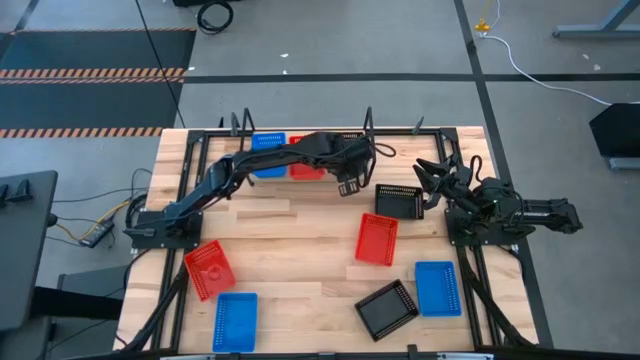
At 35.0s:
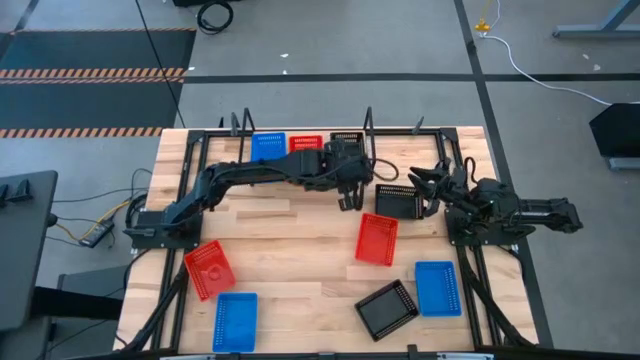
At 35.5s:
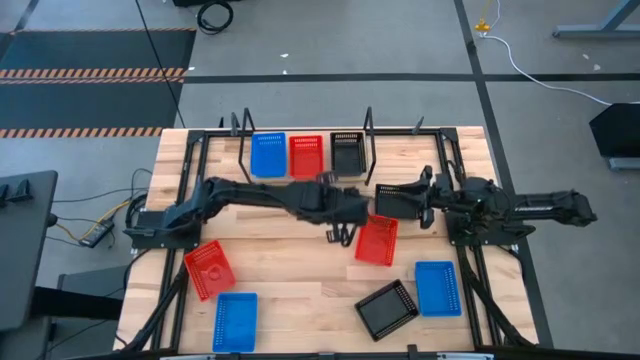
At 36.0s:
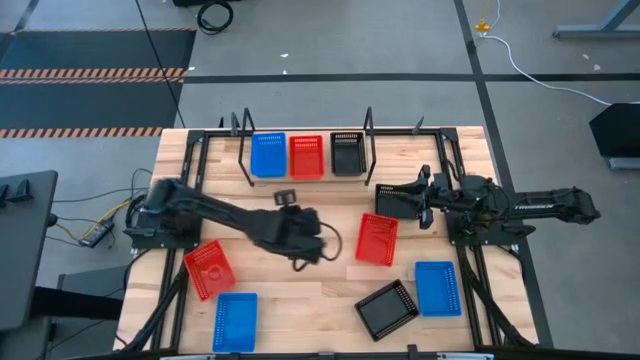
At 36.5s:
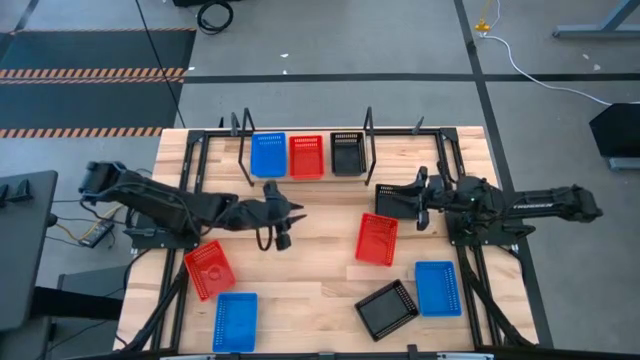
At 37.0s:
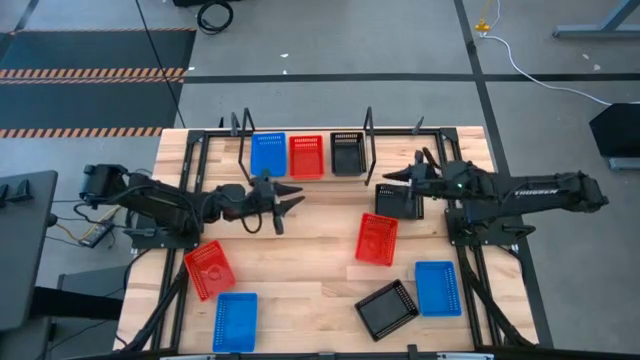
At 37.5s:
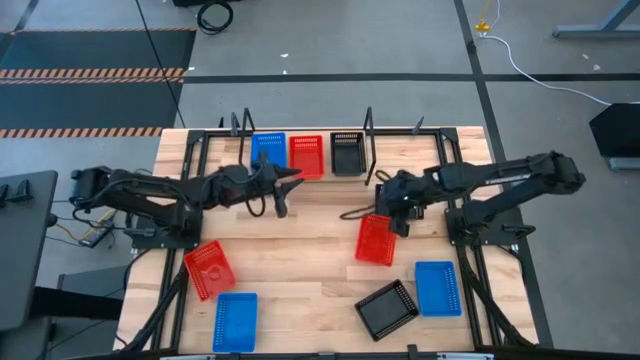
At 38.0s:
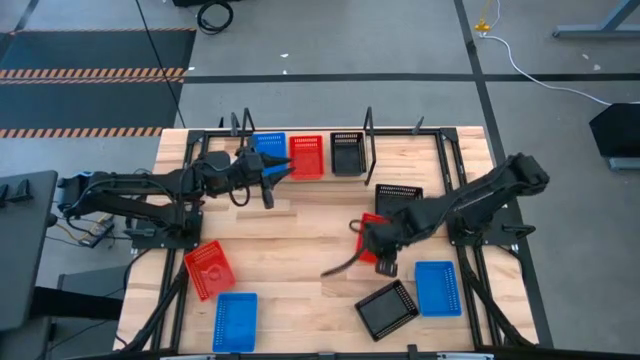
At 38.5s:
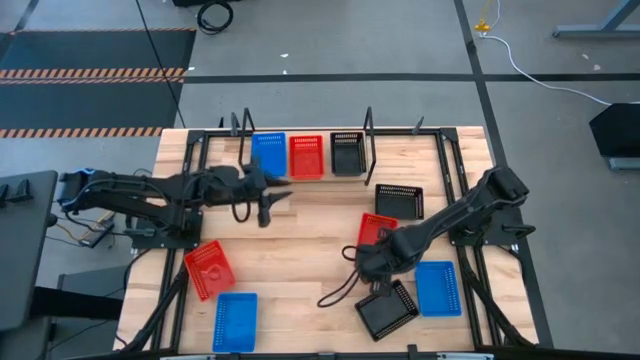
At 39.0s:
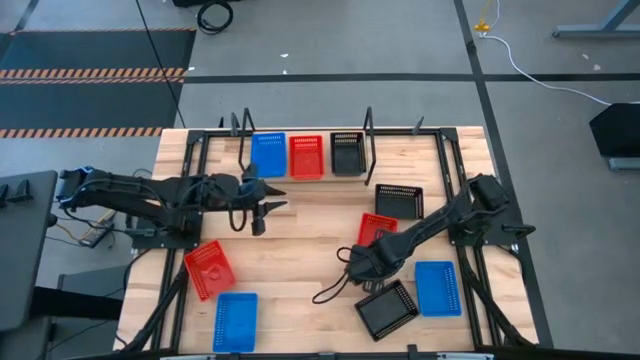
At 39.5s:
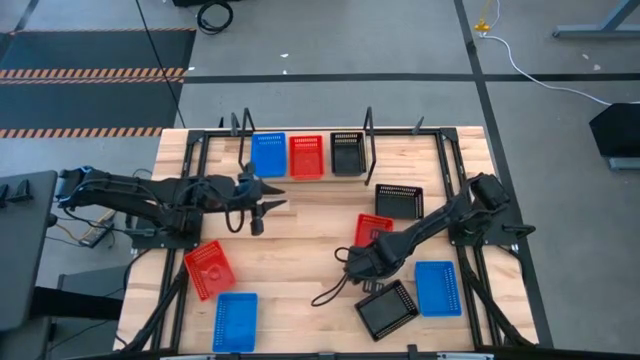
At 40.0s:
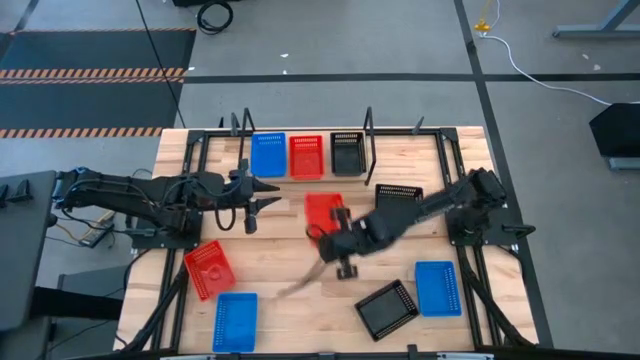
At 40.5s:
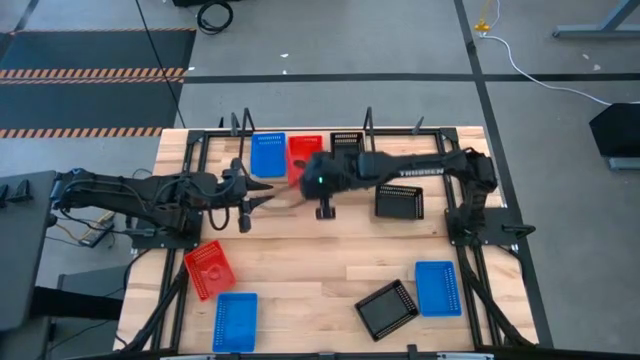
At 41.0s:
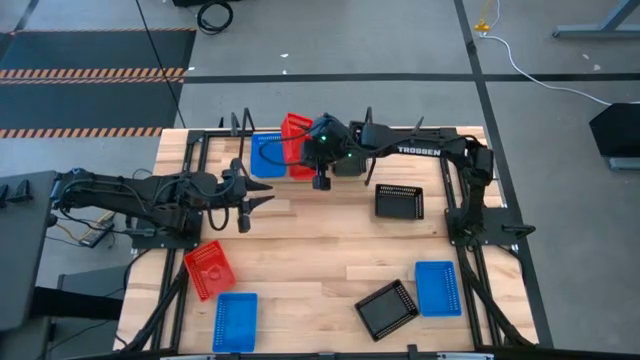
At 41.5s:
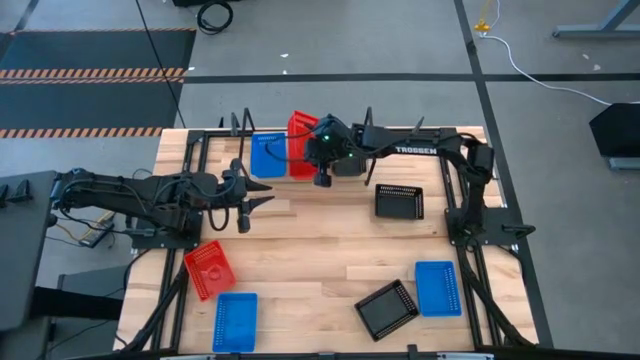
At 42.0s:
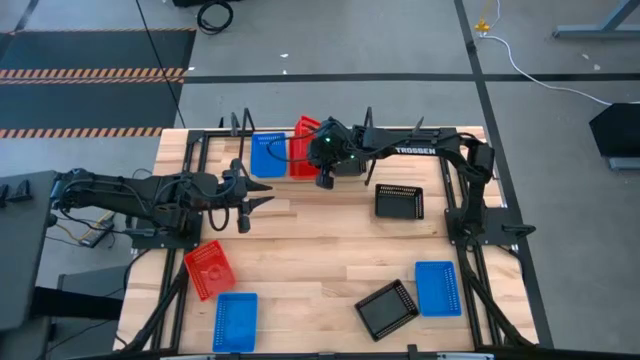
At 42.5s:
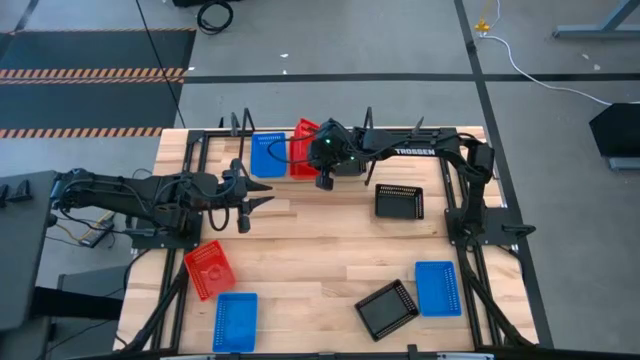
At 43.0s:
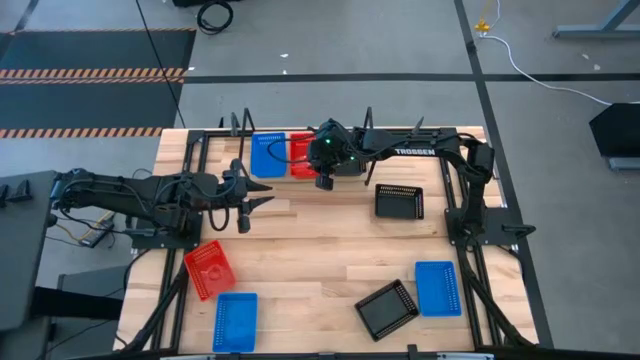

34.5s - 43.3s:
Task: Stack baskets on shelf by color
Stack the right red basket on top of the red basket on the shelf

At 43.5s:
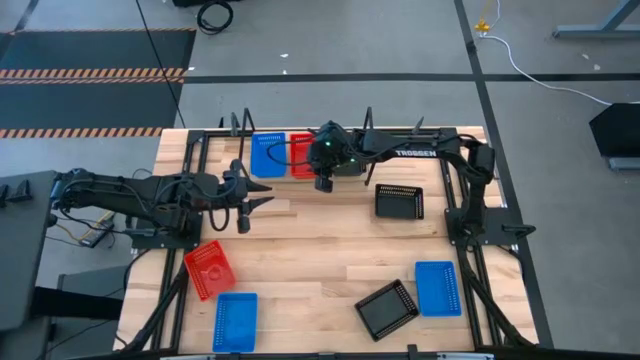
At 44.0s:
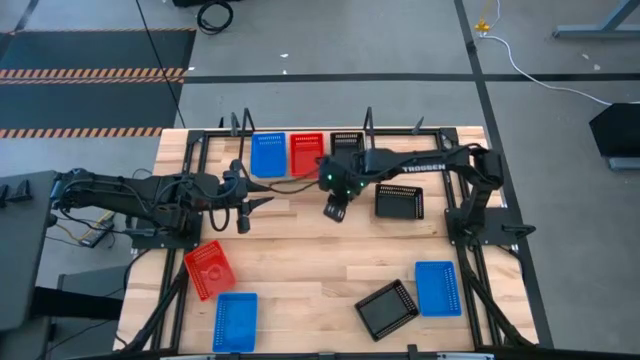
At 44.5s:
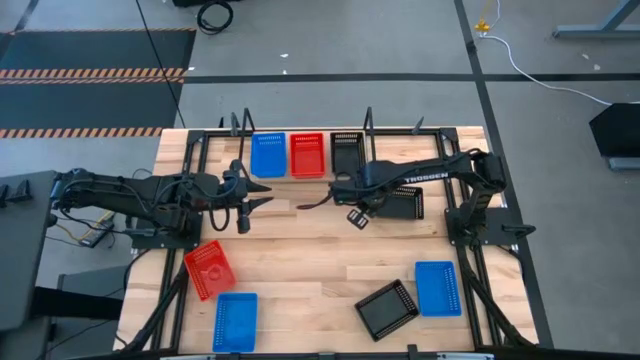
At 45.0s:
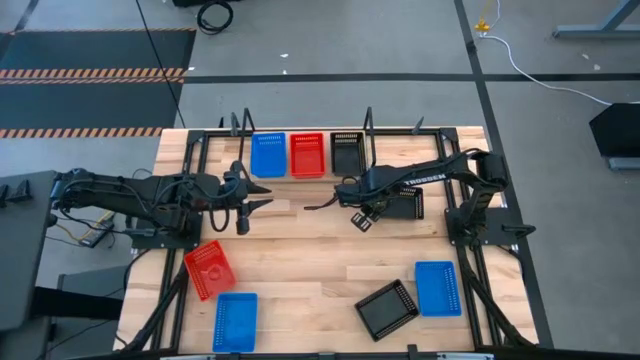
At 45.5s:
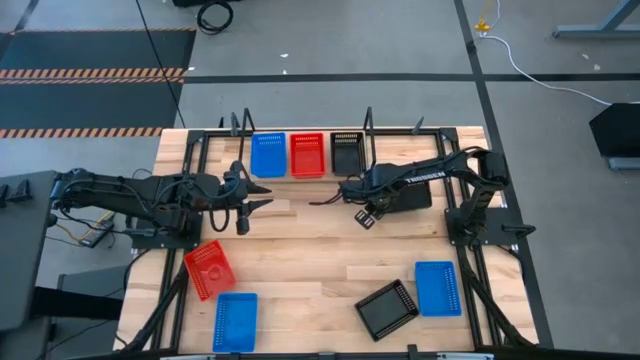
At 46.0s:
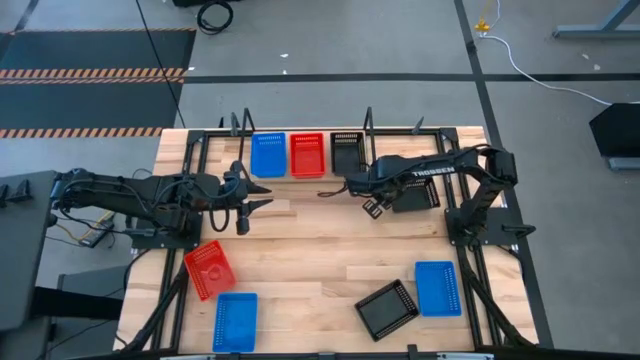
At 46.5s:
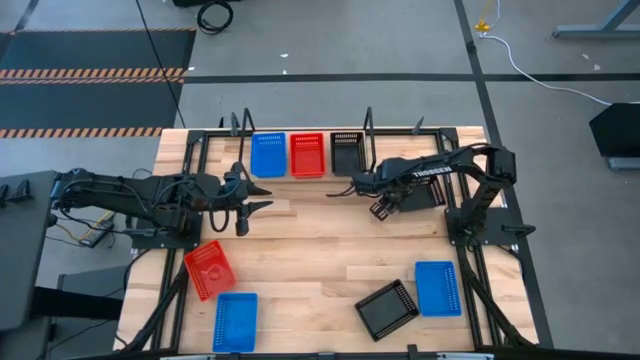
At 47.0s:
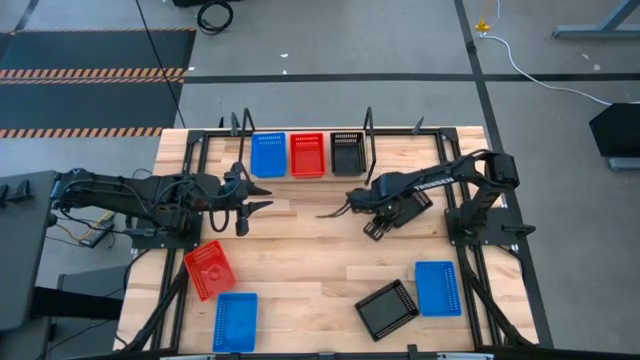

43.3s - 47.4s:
Stack the top black bin on top of the black bin on the shelf

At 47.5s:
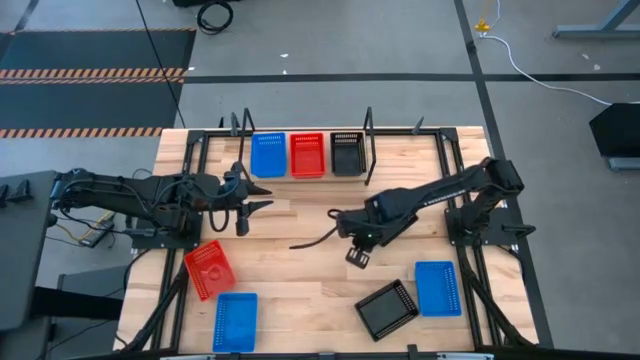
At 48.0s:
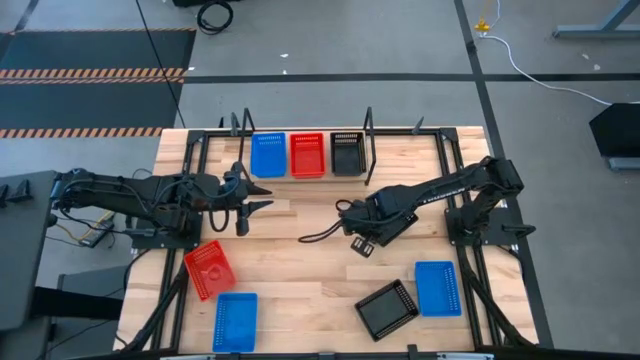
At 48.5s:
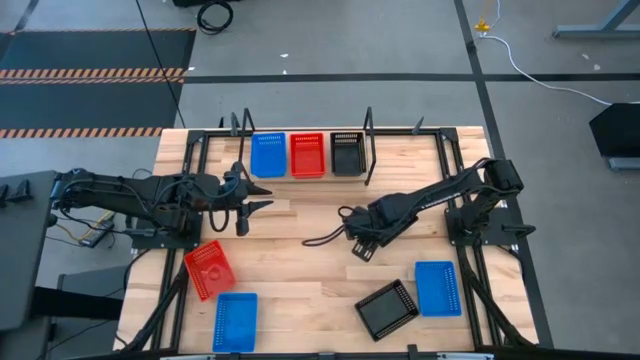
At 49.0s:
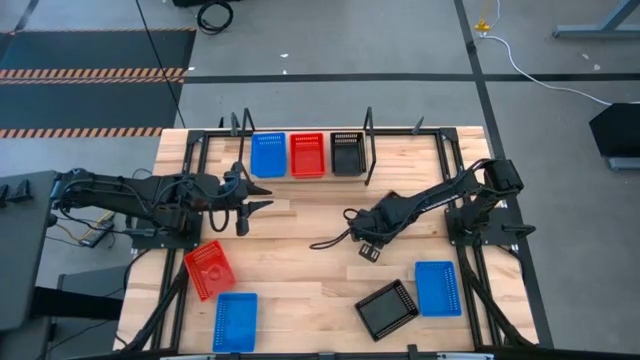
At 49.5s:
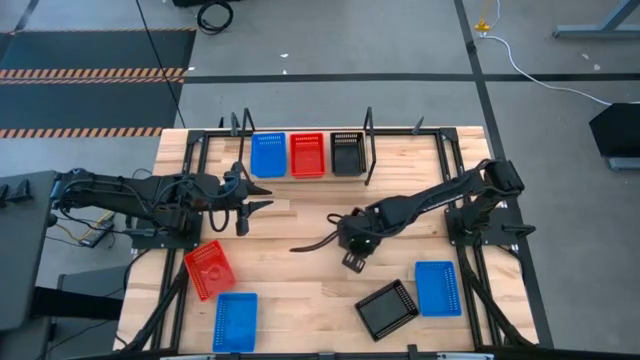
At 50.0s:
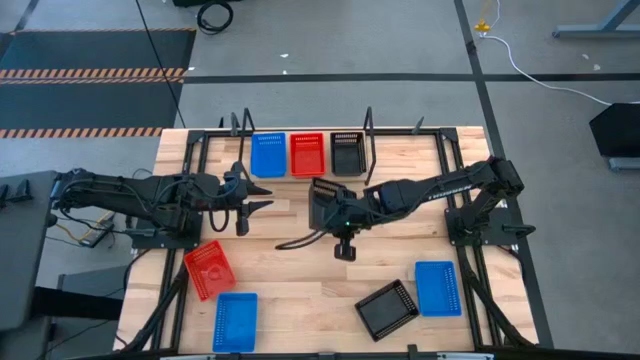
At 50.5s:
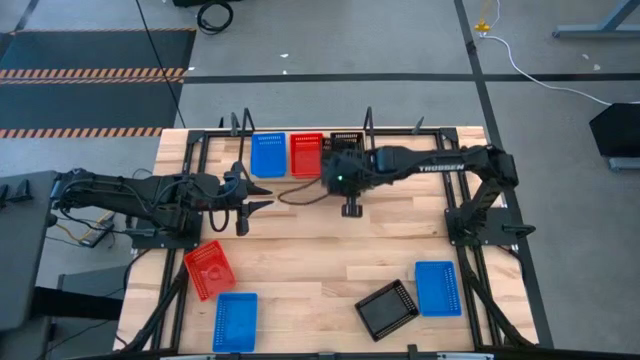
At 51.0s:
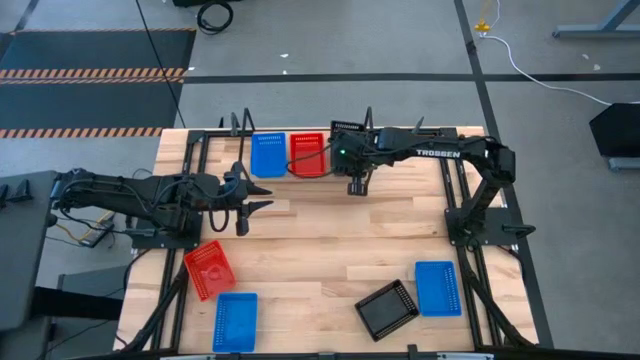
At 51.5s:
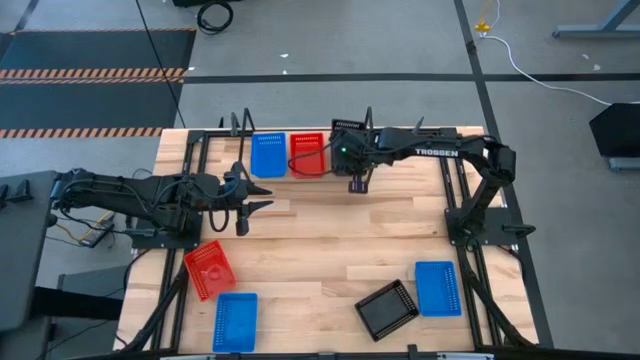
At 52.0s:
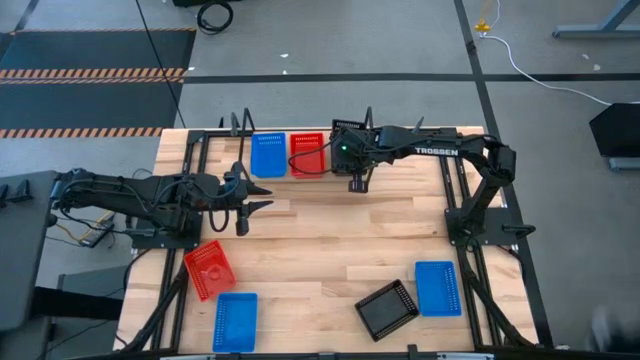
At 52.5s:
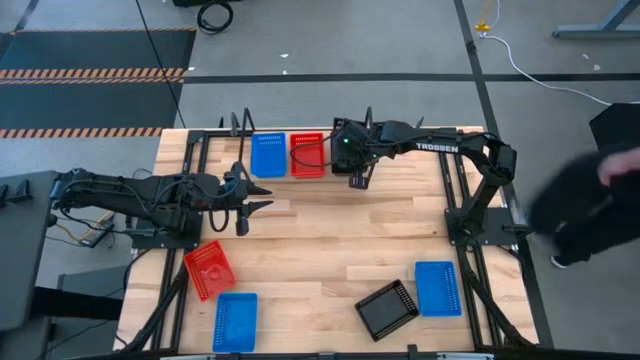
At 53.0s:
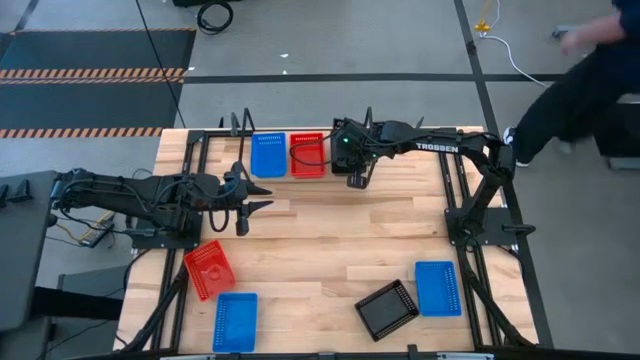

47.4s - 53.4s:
Stack the top black basket on top of the black basket on the shelf

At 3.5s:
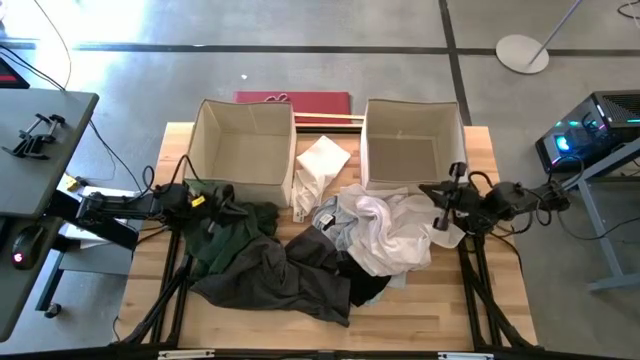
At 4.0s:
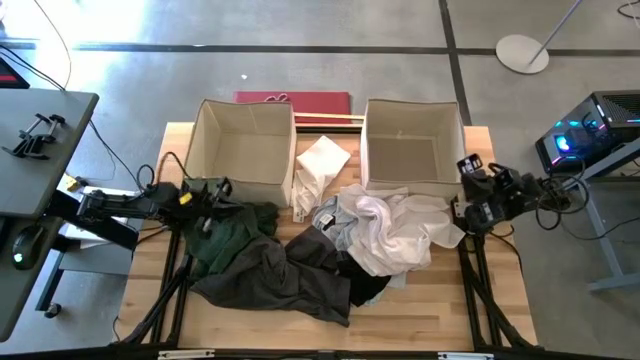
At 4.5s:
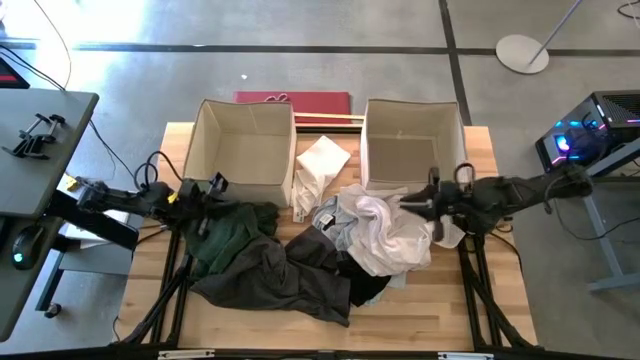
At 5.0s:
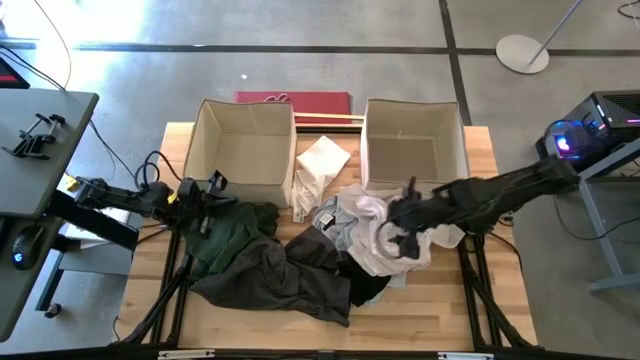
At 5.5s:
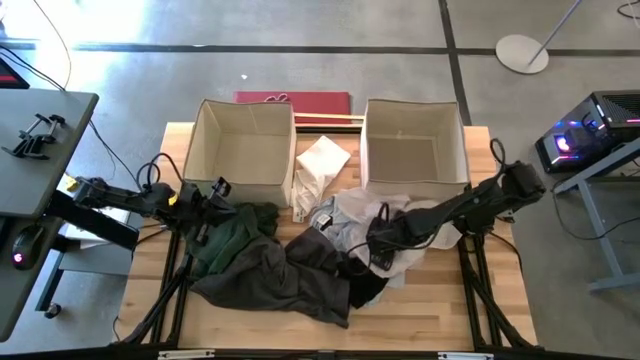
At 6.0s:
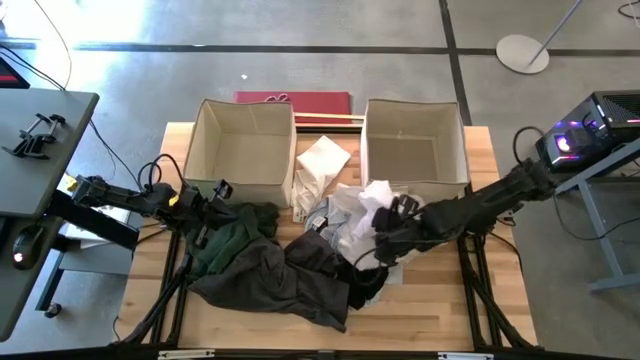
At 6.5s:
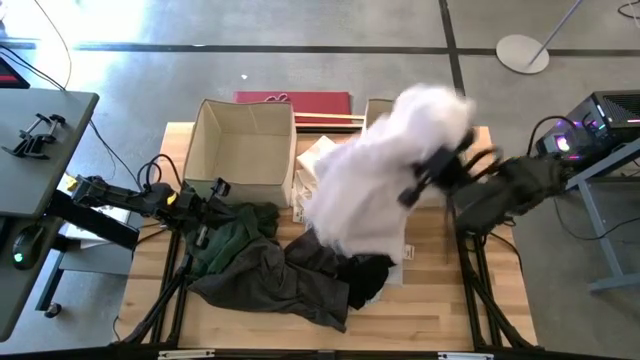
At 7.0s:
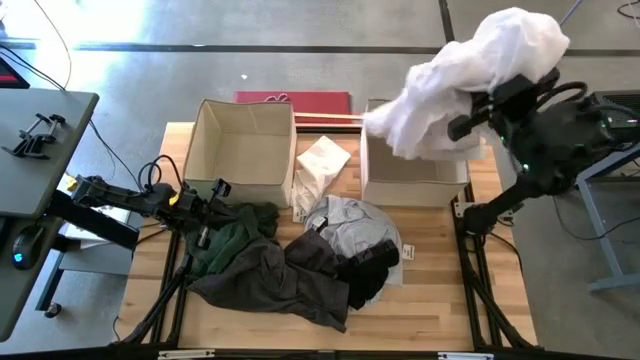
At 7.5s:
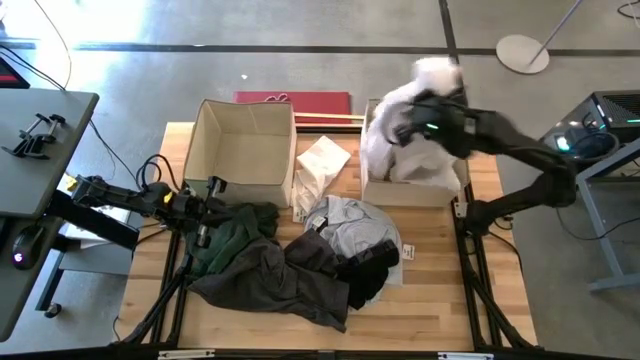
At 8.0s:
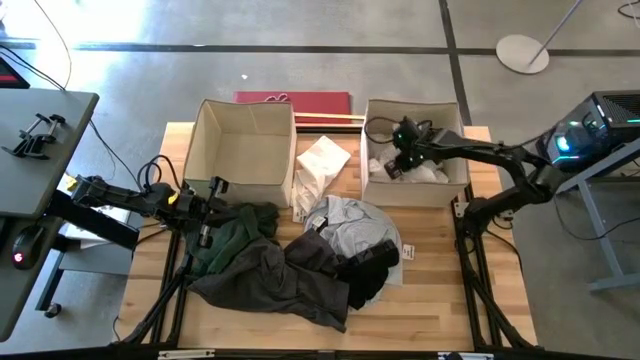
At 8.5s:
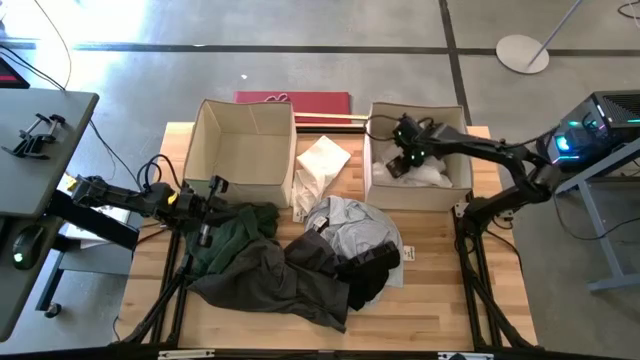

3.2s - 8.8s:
Task: Sort clothes
Put the white shirt into the right brown laundry bin
